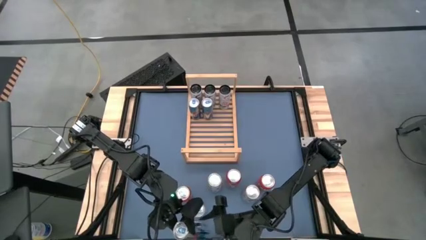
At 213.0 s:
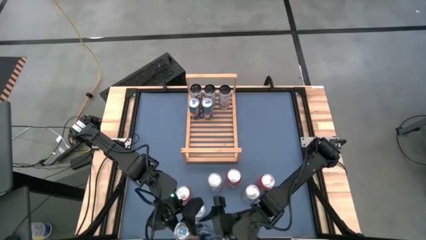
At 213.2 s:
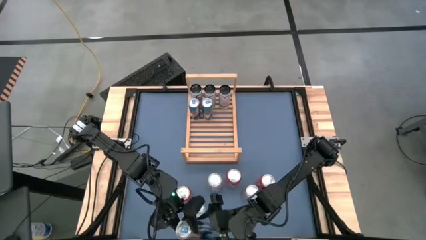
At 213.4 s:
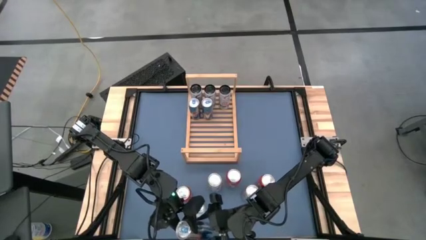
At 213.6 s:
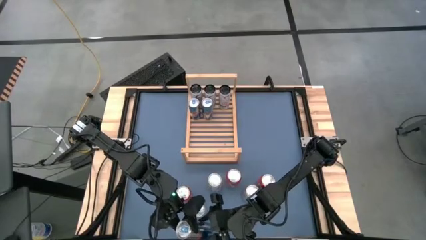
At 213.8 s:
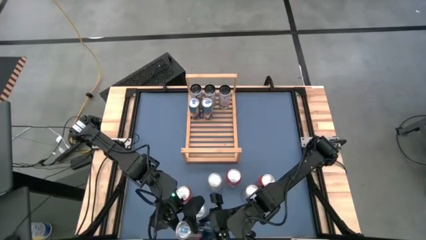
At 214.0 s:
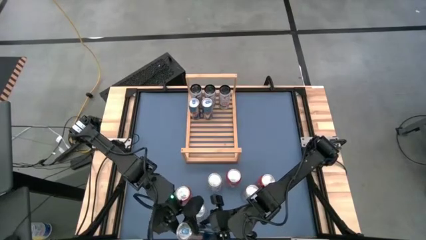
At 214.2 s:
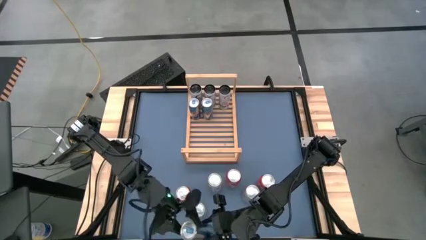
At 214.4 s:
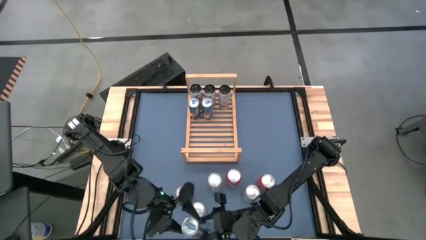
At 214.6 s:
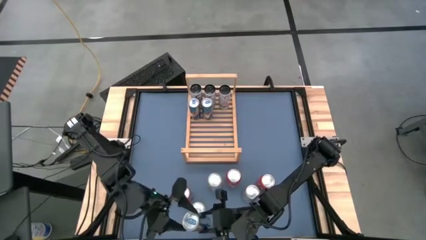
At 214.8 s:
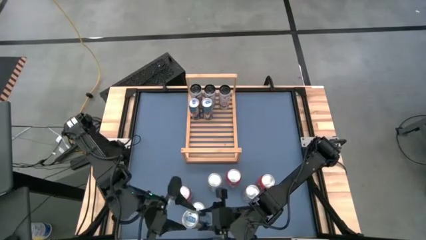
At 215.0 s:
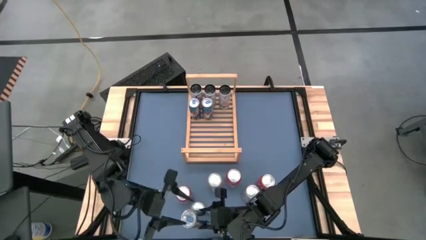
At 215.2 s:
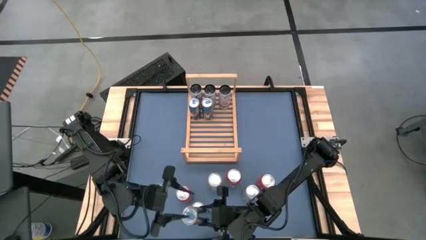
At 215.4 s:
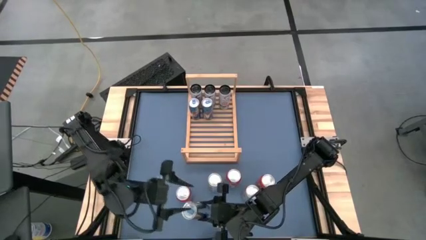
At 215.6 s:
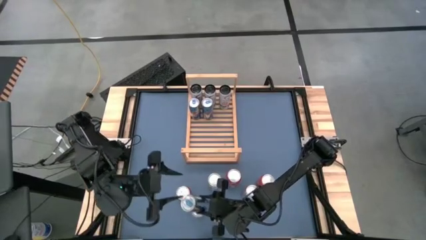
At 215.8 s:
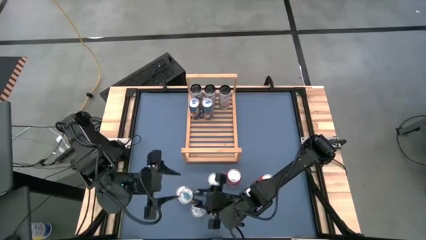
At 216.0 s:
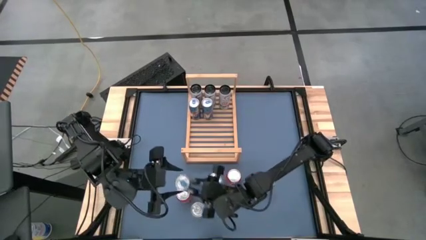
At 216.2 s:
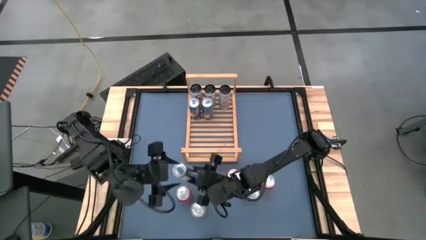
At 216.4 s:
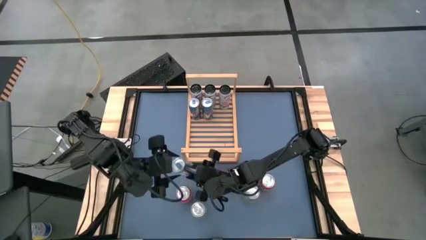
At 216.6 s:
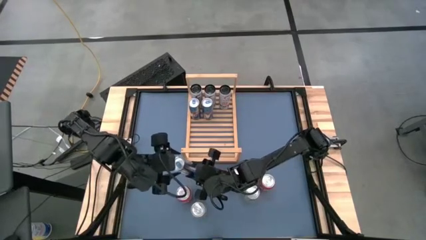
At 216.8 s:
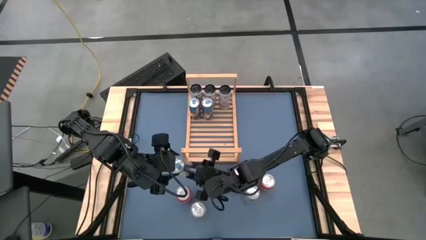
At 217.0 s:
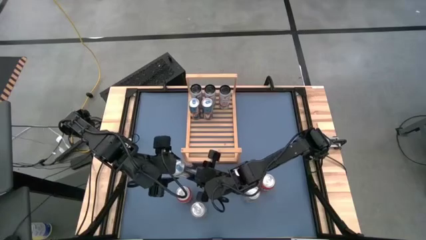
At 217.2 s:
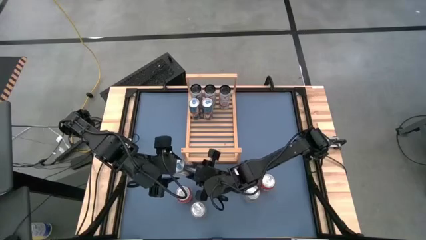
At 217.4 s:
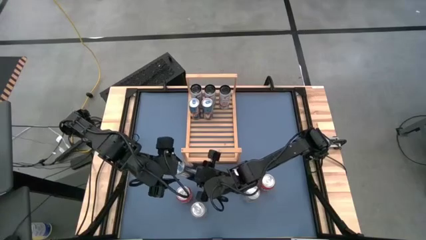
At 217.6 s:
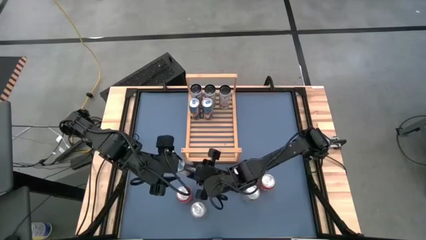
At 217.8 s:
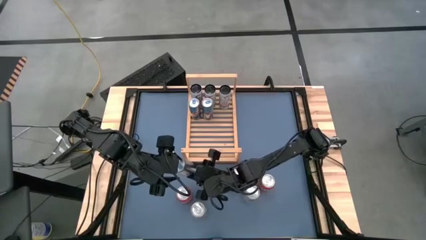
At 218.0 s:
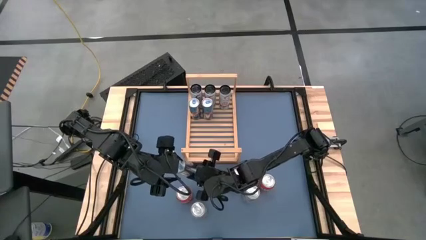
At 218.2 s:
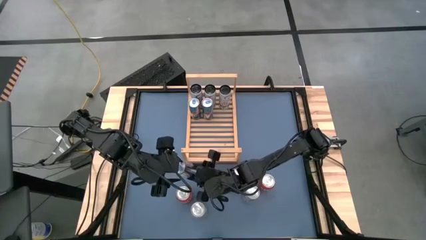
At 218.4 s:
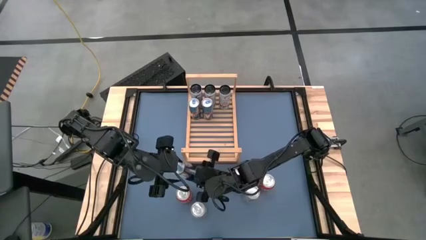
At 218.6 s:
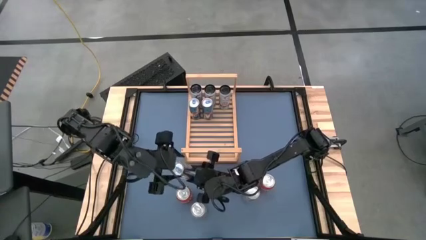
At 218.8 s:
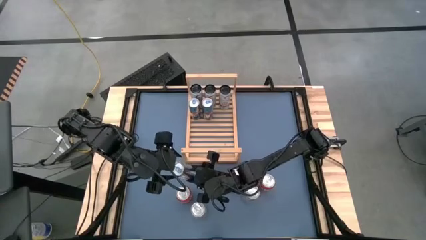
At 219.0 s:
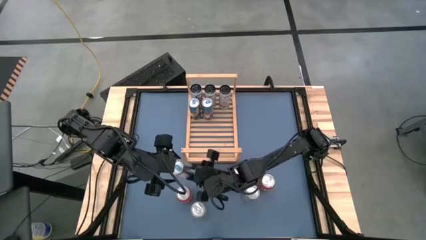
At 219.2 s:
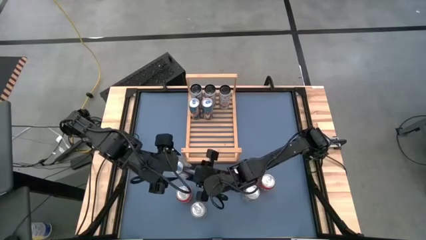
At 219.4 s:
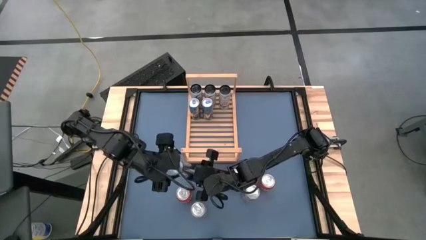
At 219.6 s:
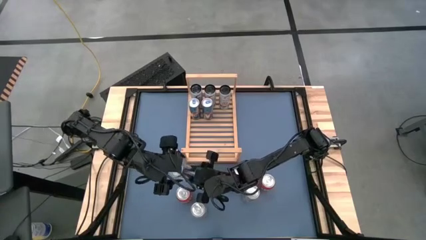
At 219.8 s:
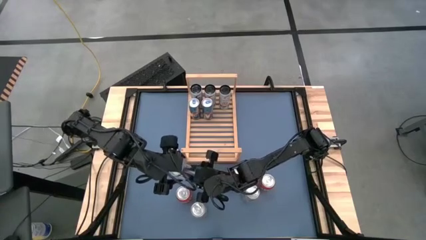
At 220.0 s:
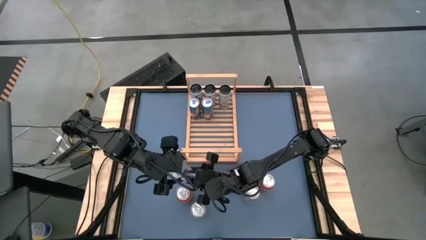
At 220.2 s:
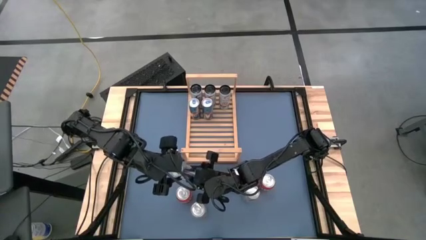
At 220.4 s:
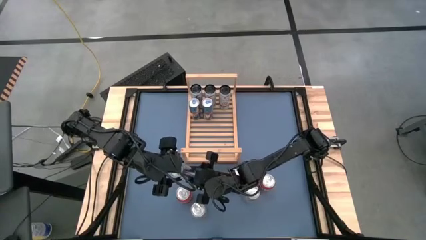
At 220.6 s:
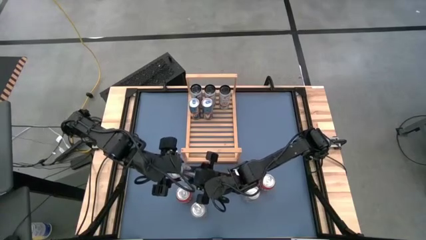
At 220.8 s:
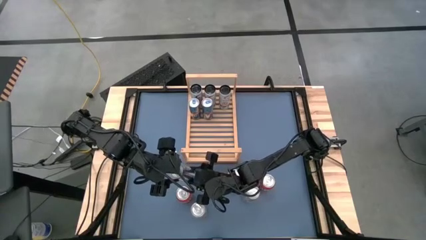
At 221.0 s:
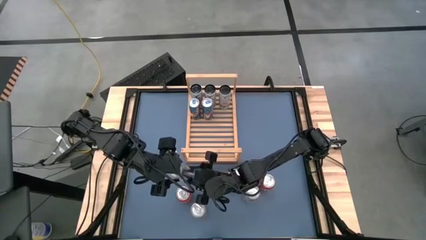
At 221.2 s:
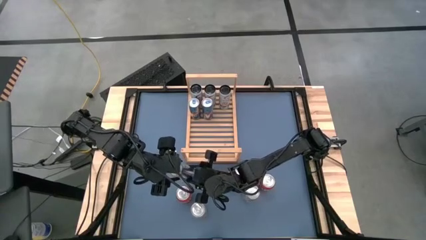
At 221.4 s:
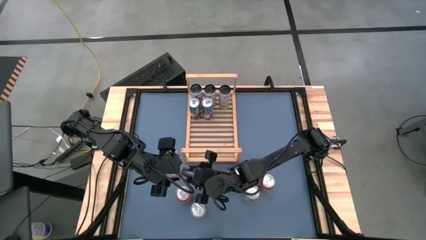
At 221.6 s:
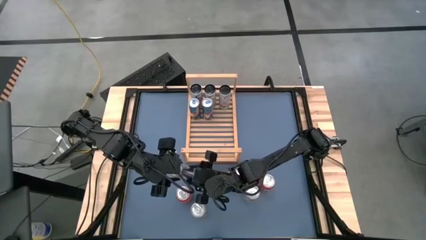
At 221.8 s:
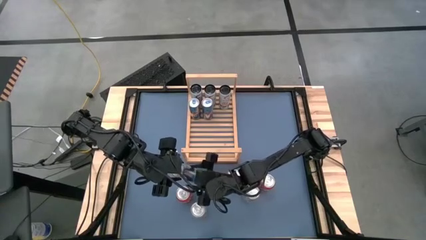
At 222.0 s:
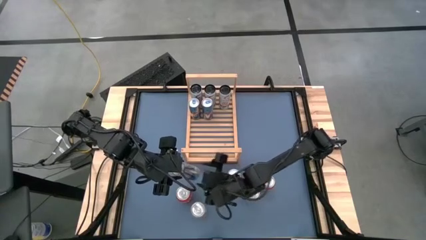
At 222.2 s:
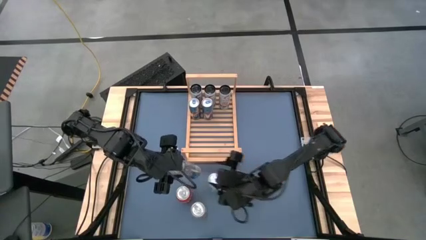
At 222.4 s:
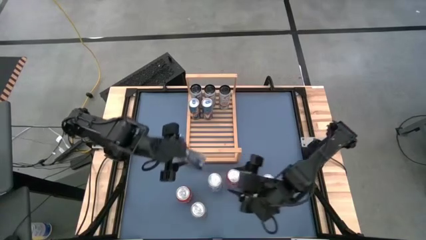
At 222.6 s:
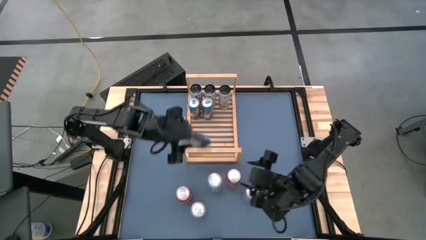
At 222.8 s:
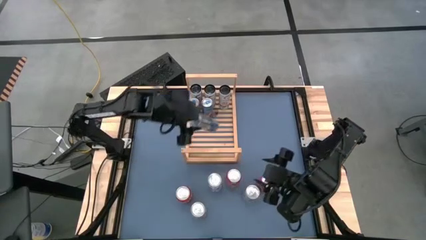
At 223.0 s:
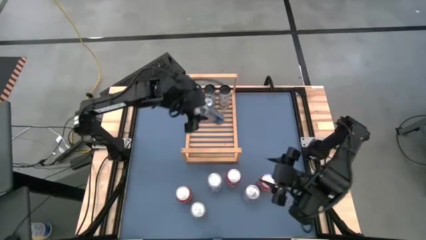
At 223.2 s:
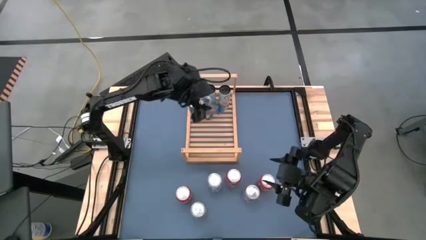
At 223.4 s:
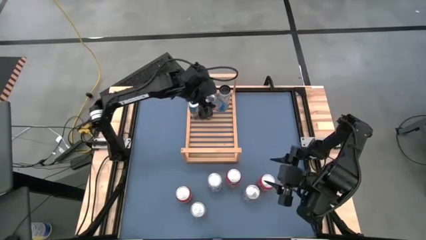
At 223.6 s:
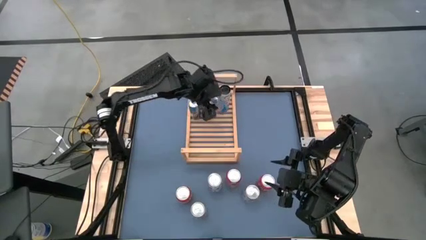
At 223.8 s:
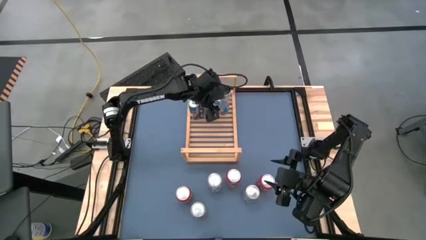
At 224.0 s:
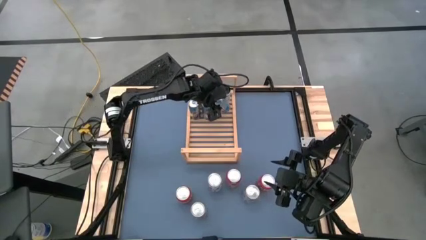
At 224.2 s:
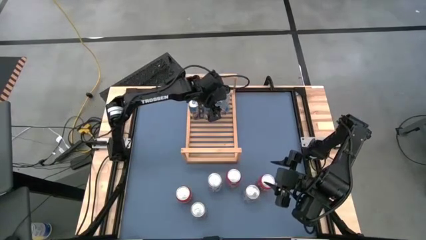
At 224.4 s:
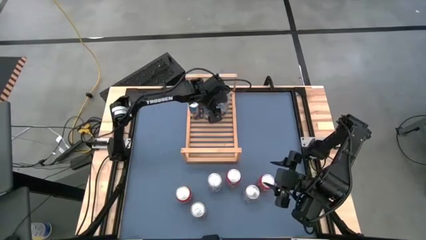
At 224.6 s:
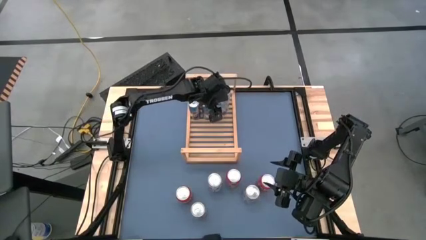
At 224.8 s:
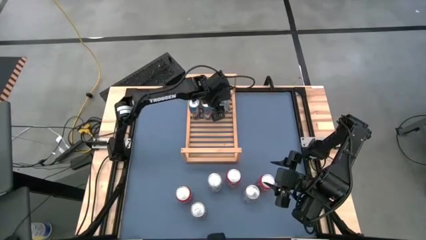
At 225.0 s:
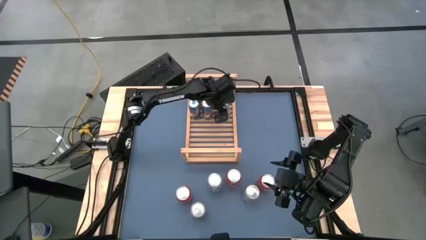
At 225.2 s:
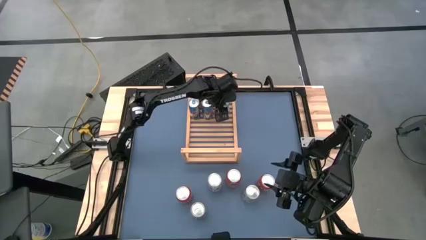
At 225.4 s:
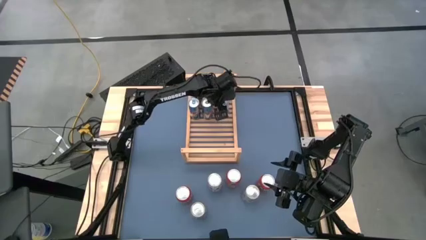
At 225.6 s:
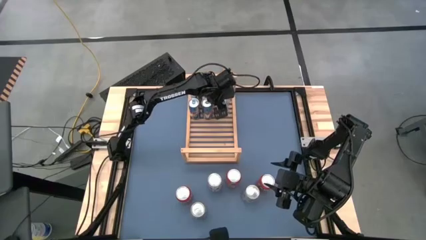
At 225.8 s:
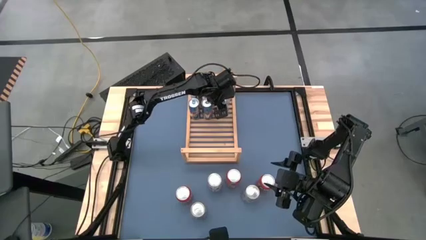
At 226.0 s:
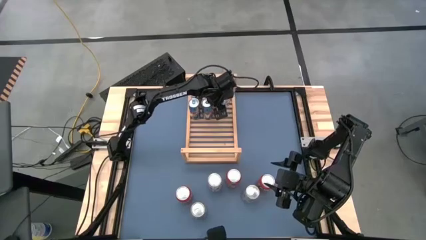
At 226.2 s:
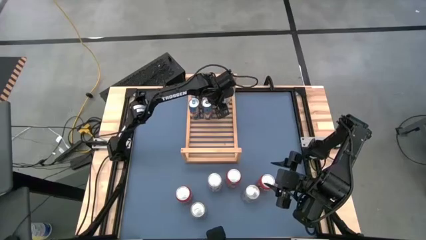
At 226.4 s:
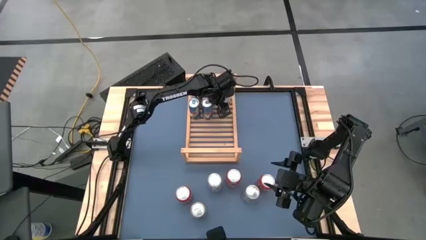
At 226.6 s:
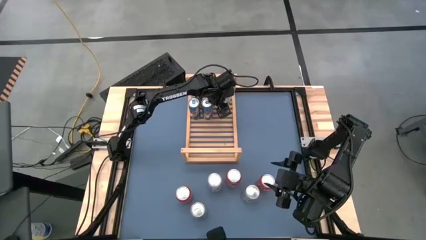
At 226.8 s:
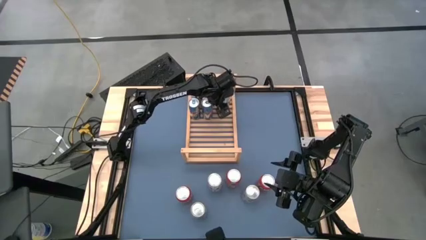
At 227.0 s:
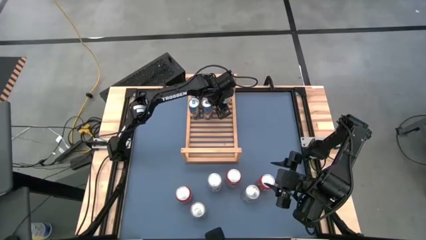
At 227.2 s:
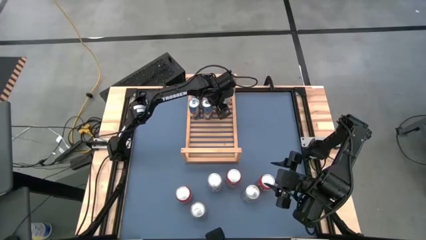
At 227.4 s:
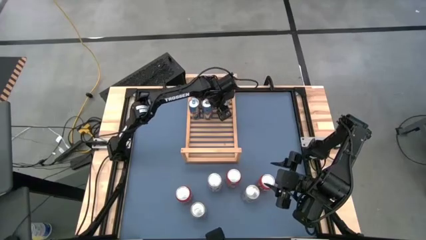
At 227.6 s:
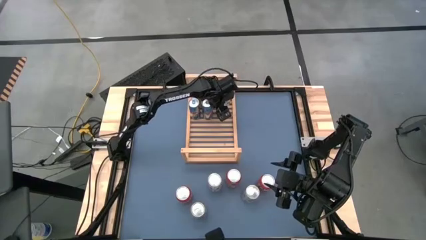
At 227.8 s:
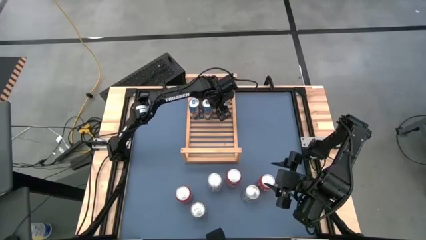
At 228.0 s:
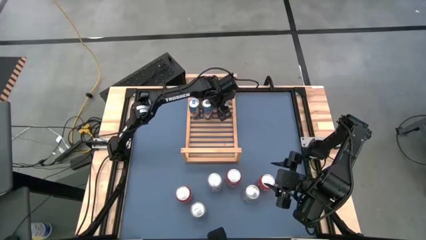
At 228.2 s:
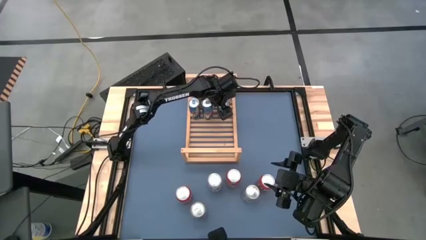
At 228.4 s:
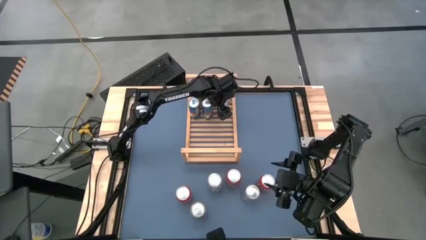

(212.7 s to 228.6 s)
Task: Place canned beverage on shelf
Put the blue soda can on the shelf aligned with the other blue soda cans
